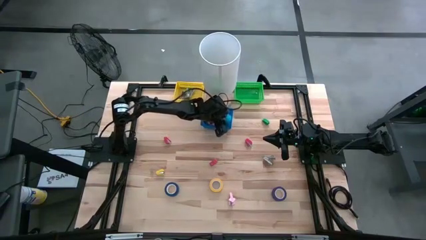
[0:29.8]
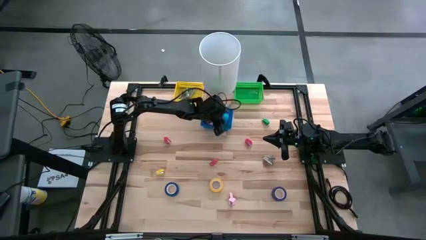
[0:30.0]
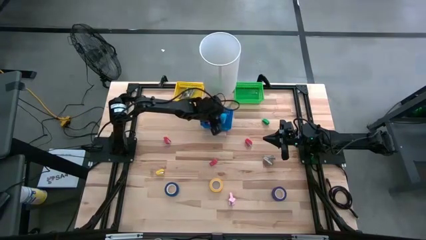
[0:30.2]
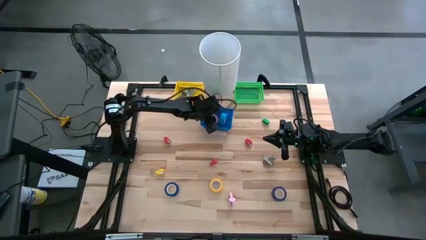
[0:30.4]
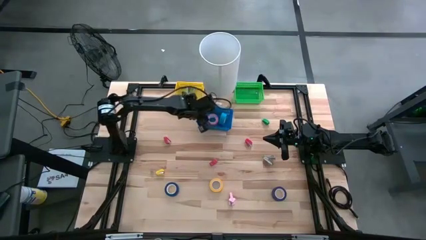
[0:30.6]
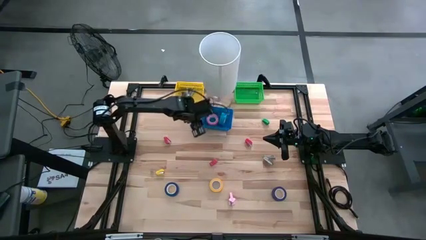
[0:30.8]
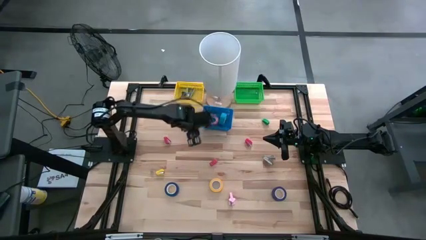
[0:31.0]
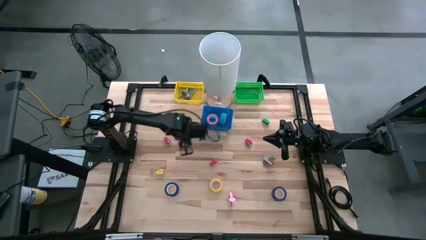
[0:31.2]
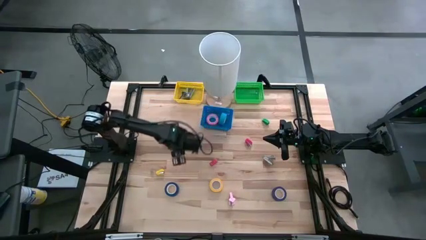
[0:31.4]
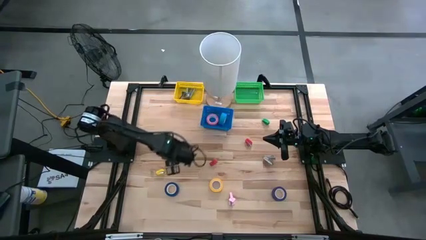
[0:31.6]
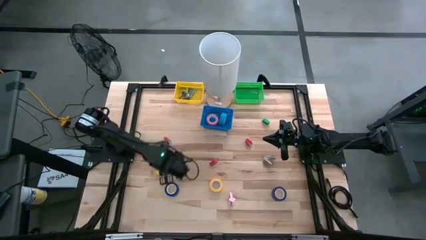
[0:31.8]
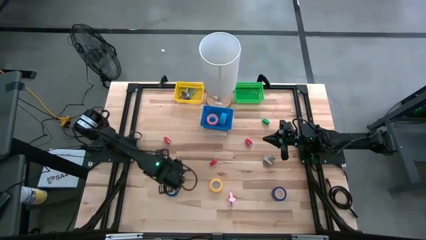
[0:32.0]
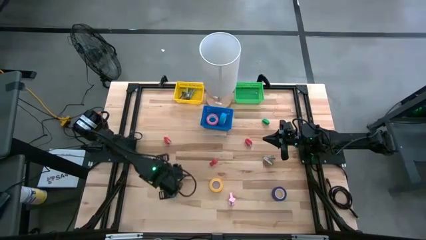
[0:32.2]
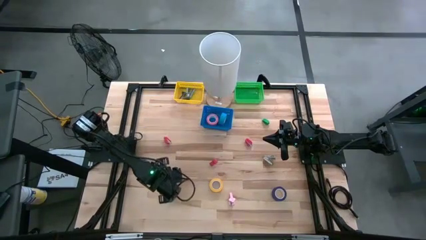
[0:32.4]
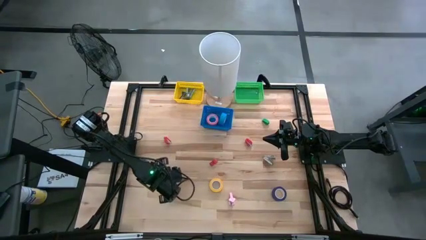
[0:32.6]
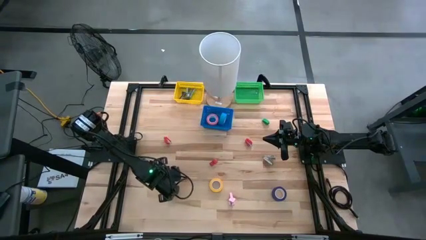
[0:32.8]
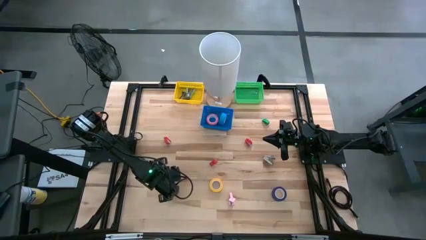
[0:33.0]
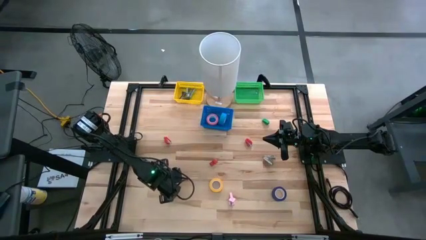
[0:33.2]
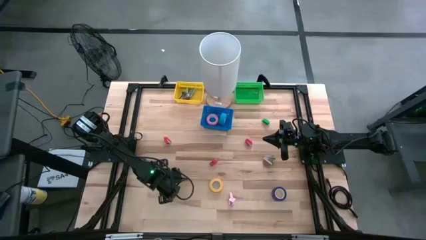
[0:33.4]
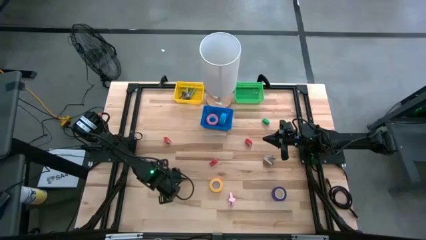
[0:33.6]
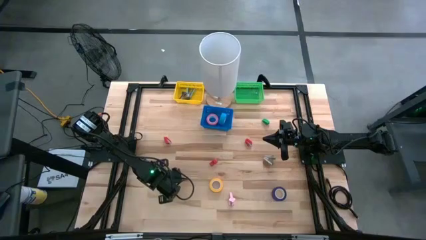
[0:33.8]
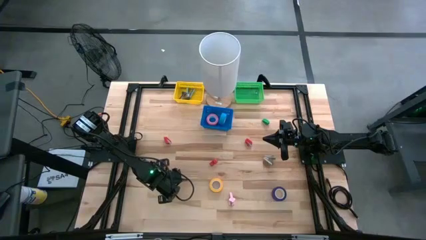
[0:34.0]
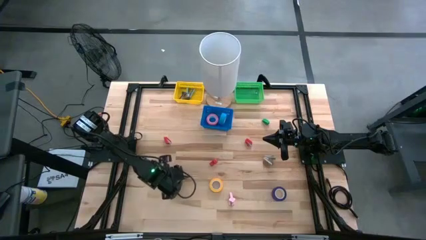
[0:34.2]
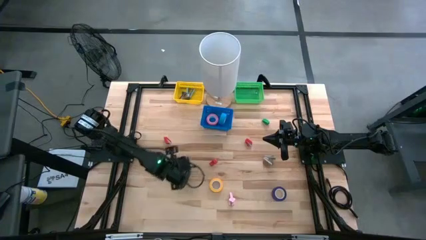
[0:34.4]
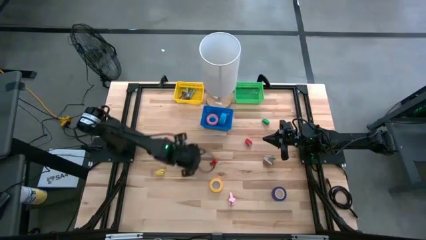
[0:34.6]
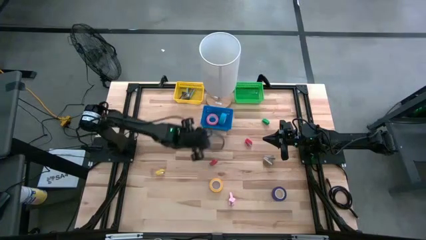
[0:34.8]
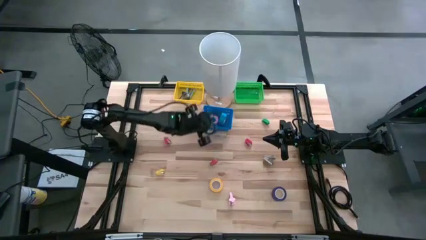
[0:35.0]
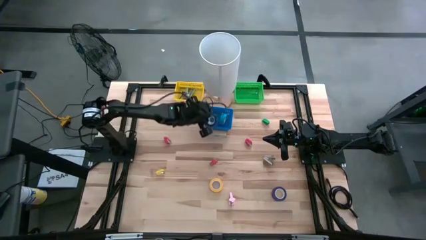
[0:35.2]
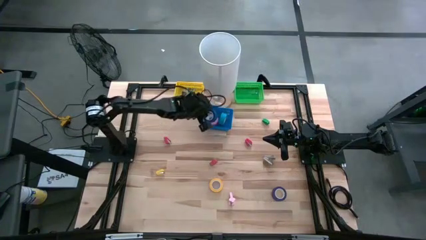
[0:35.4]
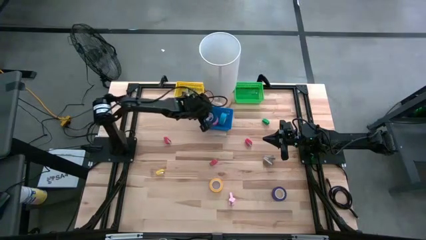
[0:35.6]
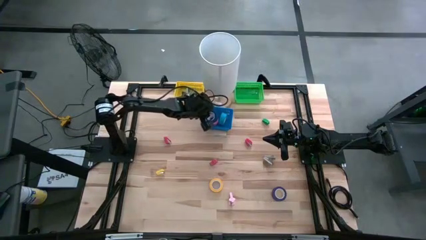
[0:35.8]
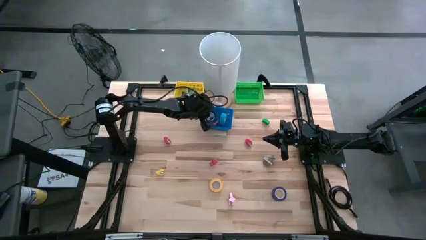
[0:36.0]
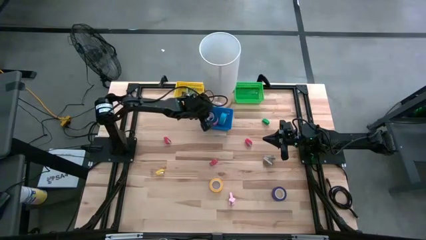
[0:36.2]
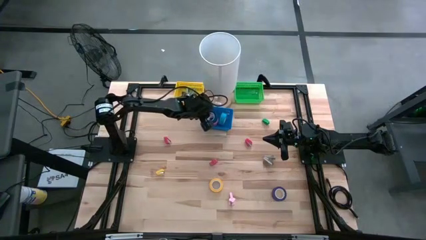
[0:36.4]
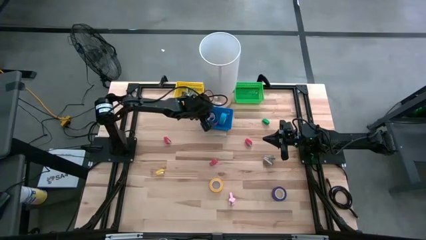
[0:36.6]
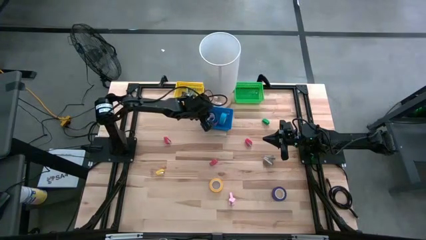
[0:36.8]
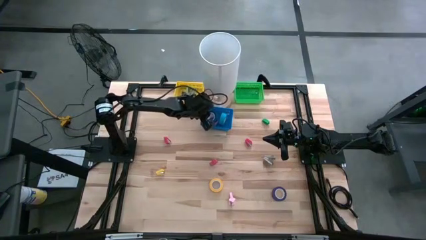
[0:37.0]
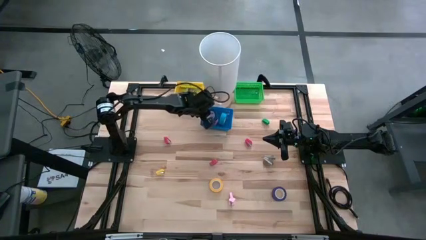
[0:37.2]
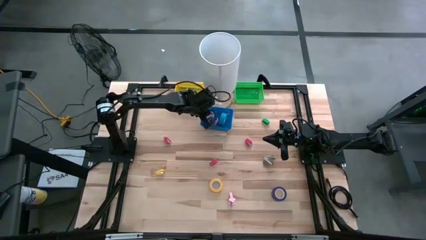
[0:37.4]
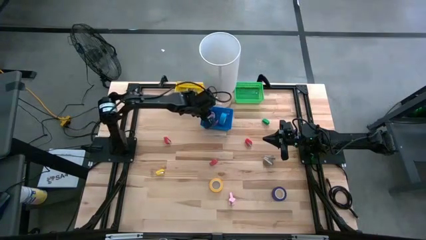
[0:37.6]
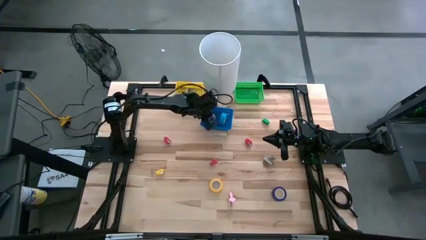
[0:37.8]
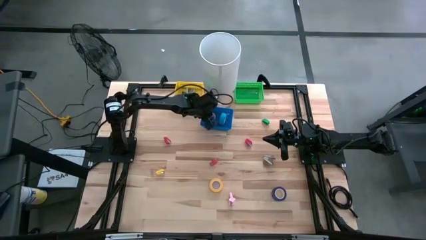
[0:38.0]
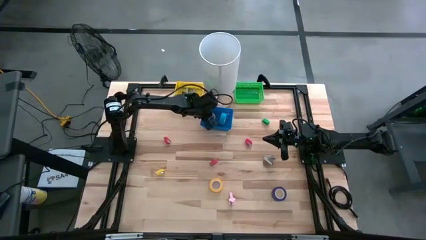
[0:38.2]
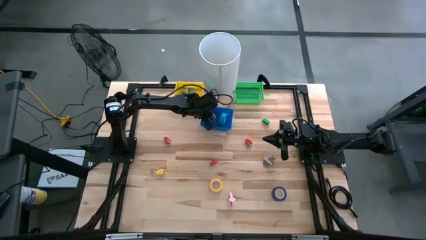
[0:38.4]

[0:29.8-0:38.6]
Task: Pick and place Stapler, Stapler remover, tape
Put the blue tape into the blue basket

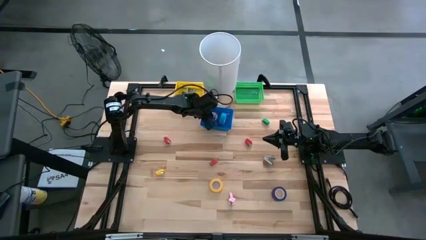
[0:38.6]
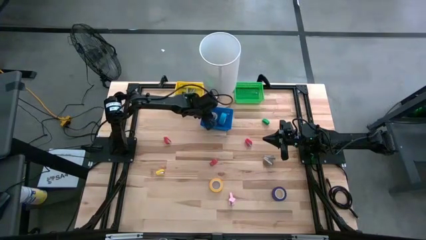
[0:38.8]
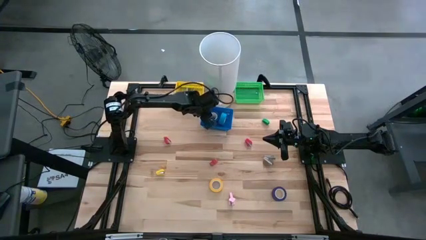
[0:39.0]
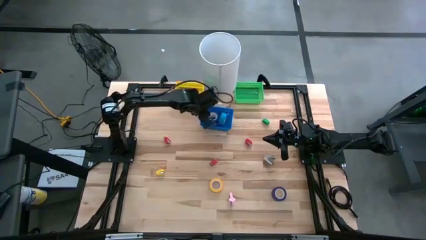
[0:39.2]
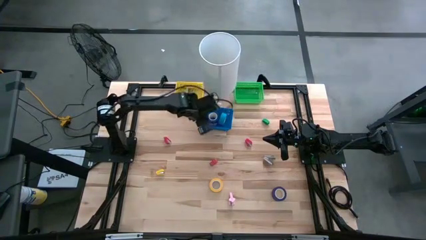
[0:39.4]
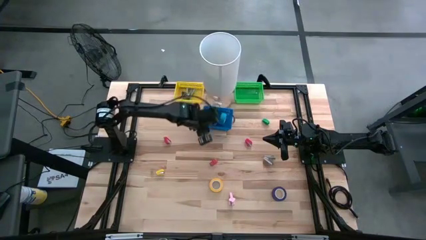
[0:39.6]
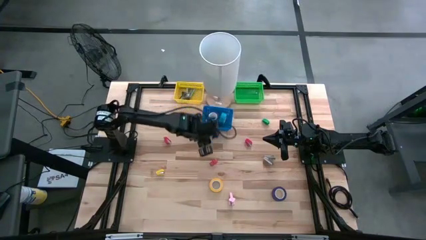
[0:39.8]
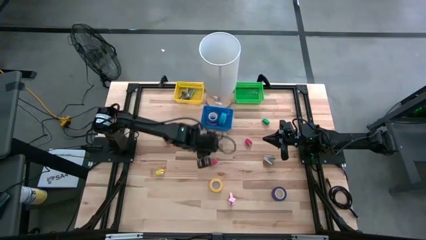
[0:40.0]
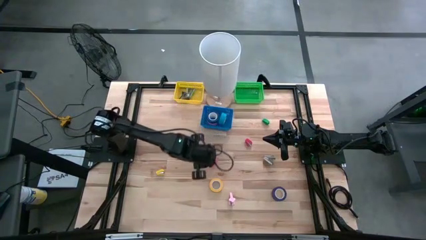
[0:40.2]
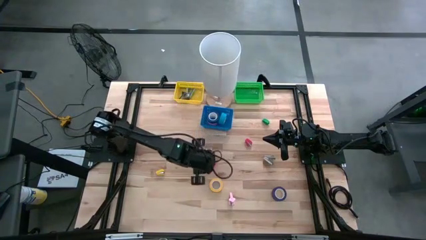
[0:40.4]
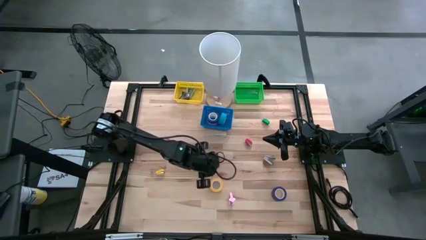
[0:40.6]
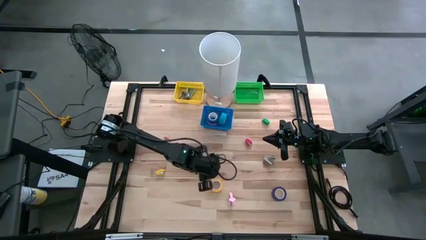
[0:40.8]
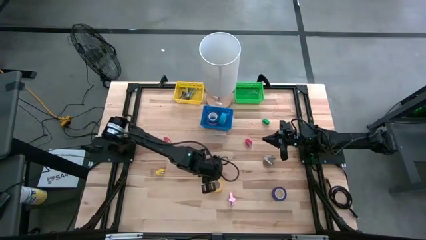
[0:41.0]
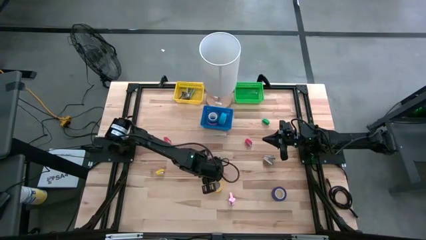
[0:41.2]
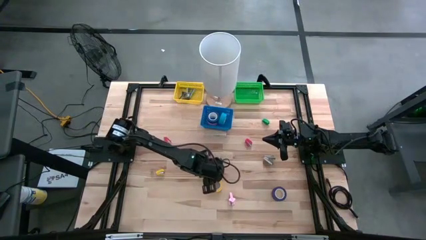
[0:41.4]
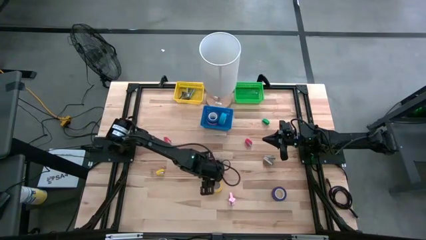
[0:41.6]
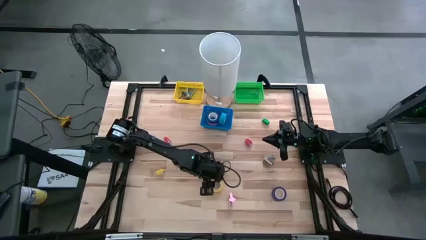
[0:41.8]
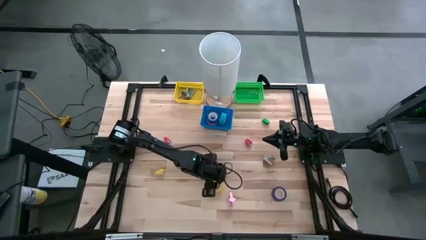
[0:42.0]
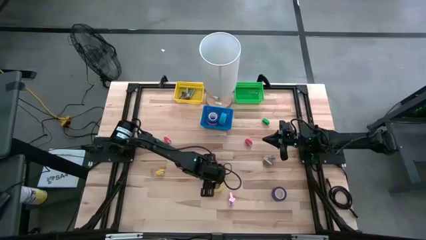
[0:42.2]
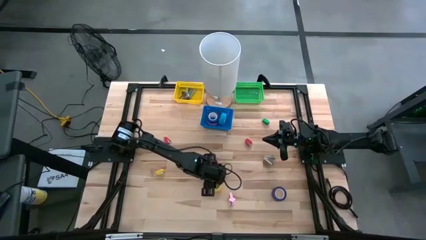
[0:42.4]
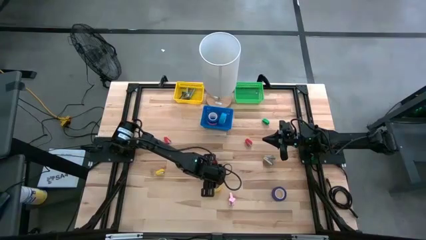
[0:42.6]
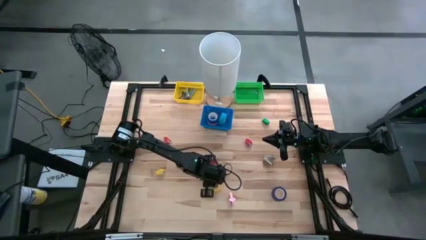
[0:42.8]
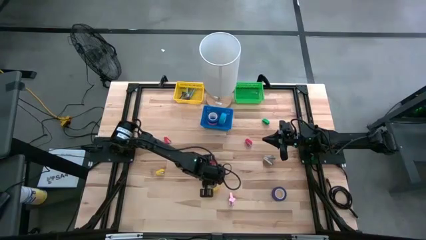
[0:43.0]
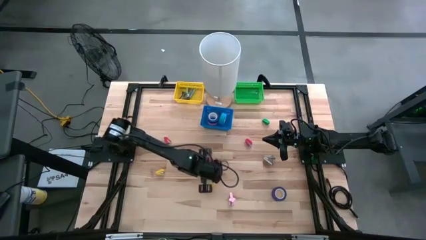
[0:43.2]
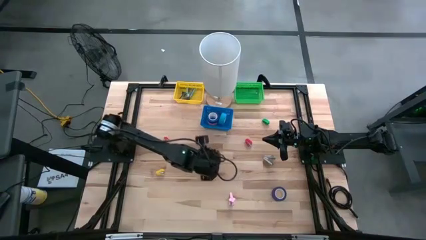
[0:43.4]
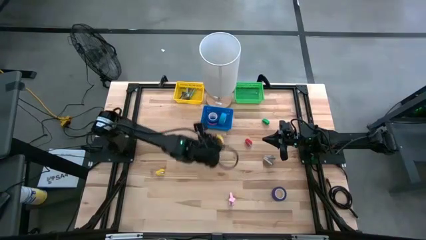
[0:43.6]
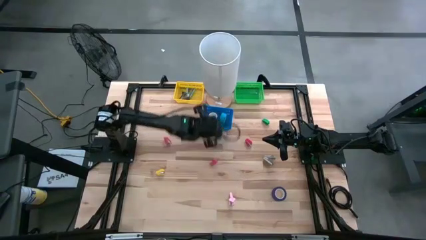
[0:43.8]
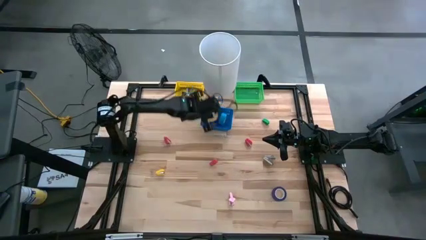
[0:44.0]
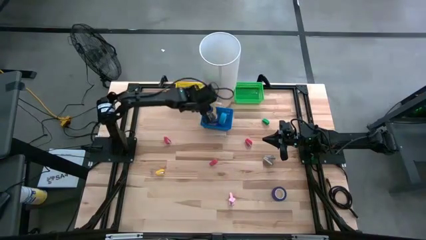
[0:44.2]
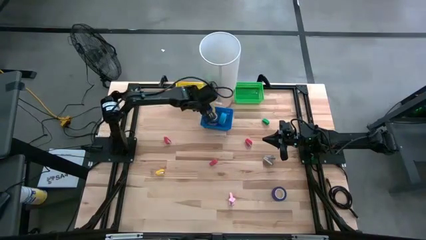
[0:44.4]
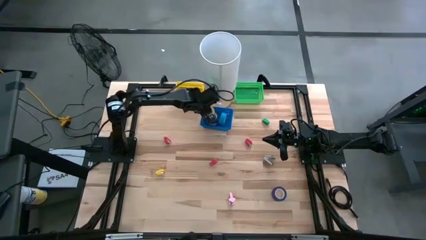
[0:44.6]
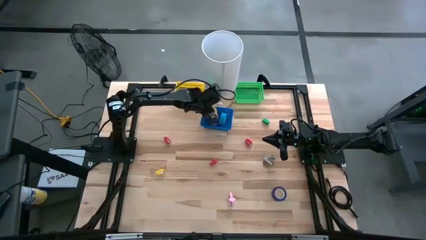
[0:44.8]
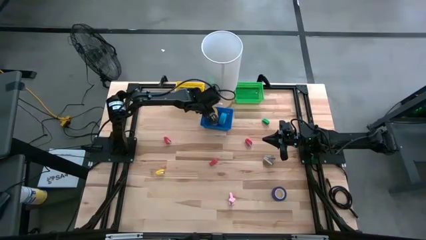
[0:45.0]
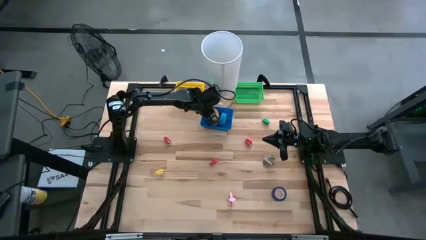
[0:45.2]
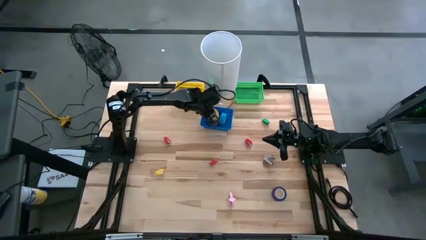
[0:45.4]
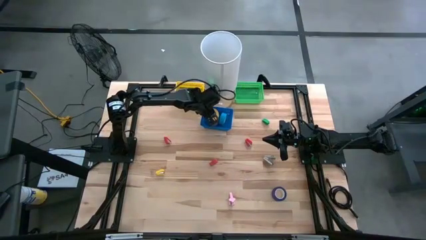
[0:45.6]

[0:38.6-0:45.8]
Put the yellow tape into the blue basket
